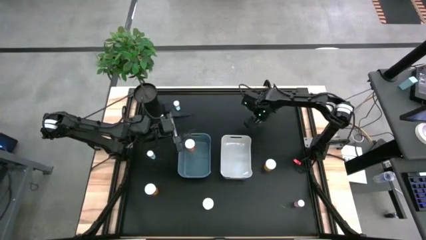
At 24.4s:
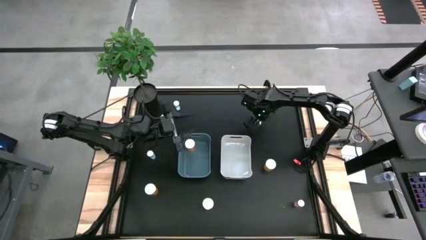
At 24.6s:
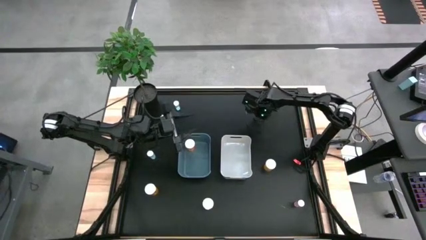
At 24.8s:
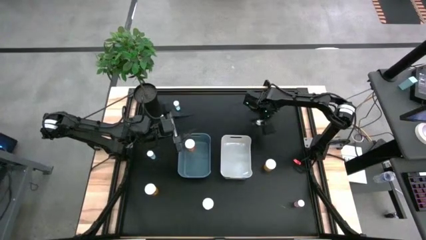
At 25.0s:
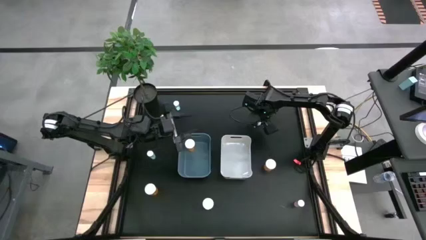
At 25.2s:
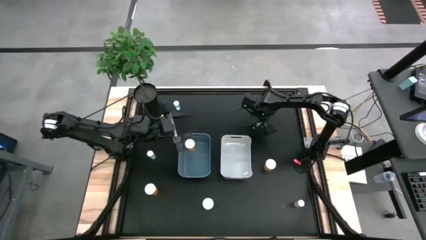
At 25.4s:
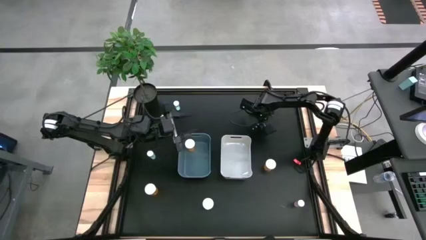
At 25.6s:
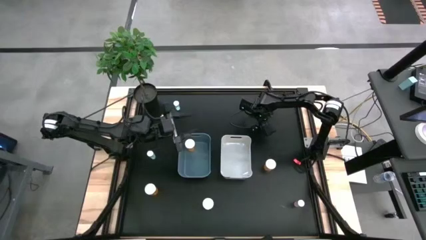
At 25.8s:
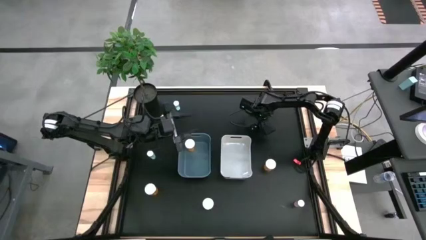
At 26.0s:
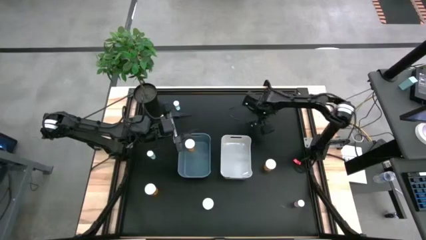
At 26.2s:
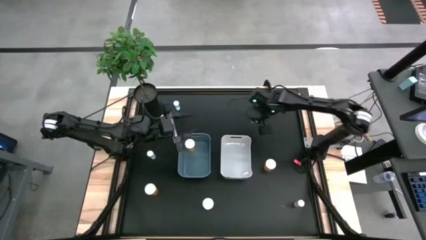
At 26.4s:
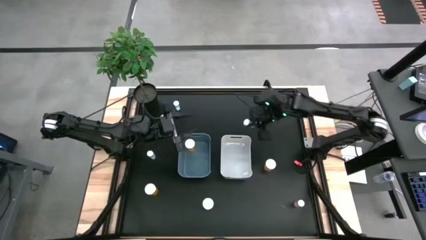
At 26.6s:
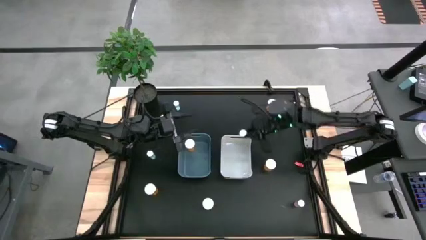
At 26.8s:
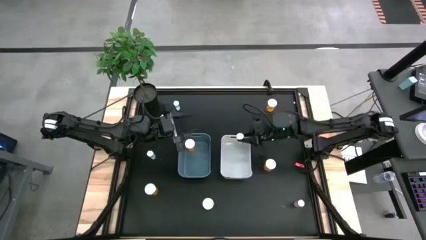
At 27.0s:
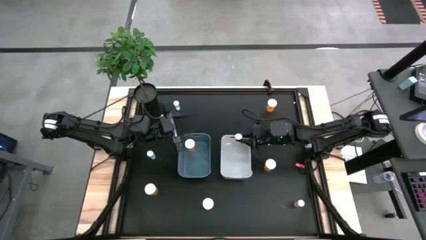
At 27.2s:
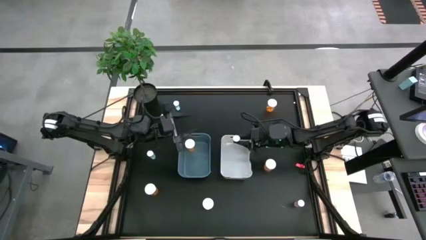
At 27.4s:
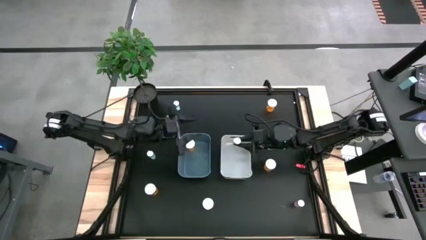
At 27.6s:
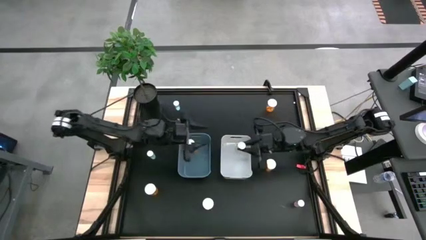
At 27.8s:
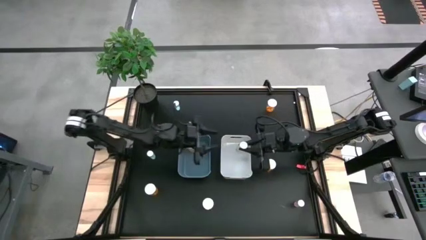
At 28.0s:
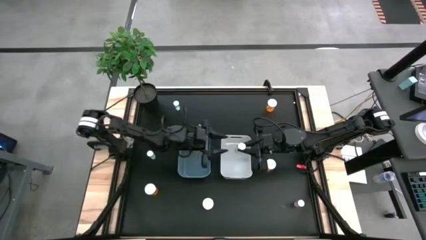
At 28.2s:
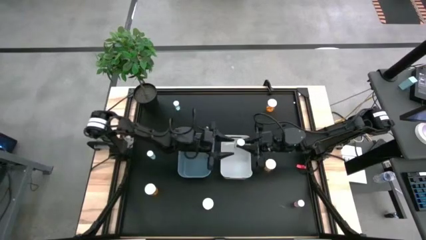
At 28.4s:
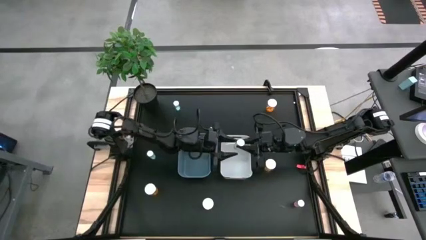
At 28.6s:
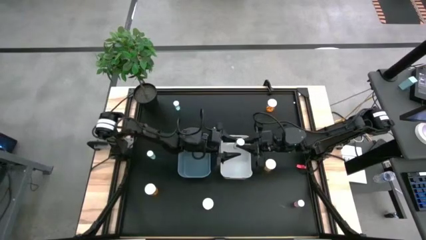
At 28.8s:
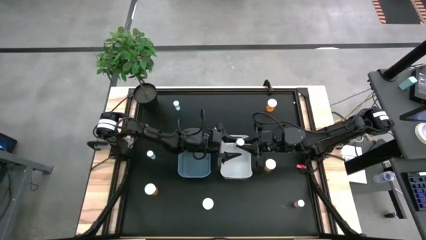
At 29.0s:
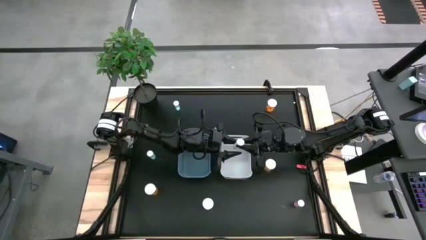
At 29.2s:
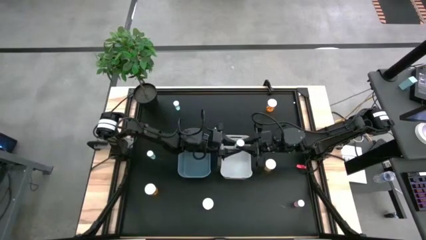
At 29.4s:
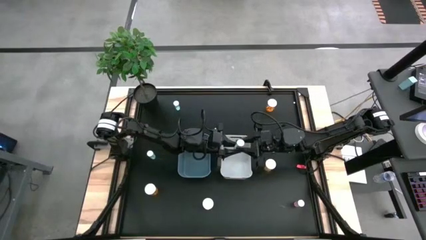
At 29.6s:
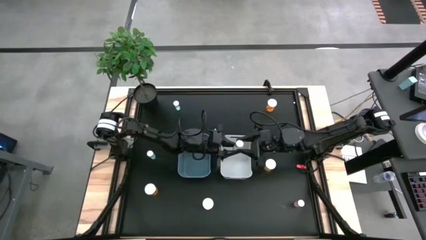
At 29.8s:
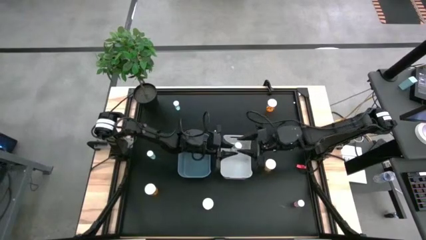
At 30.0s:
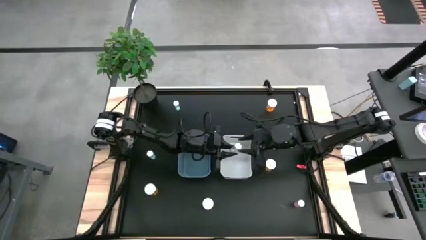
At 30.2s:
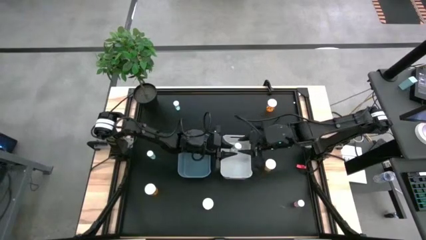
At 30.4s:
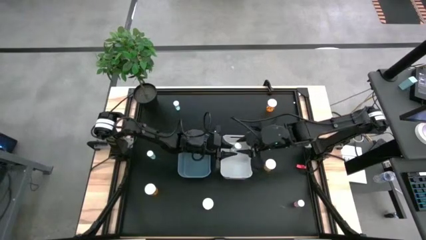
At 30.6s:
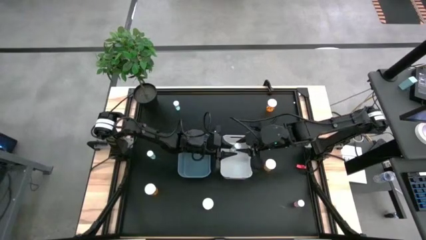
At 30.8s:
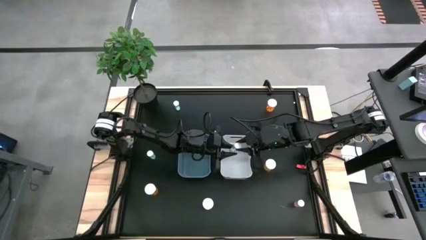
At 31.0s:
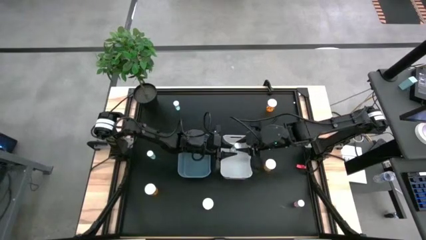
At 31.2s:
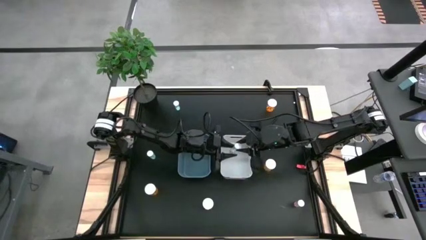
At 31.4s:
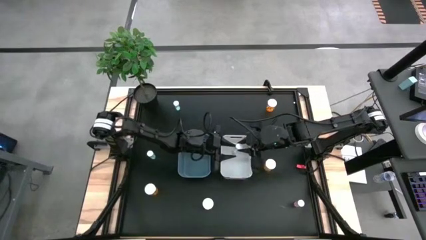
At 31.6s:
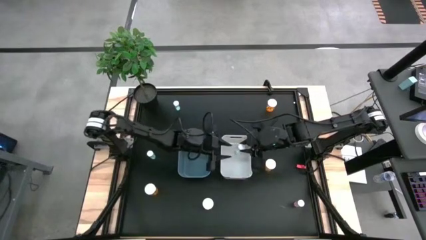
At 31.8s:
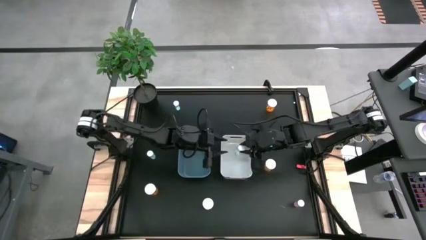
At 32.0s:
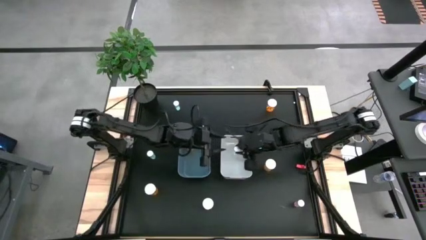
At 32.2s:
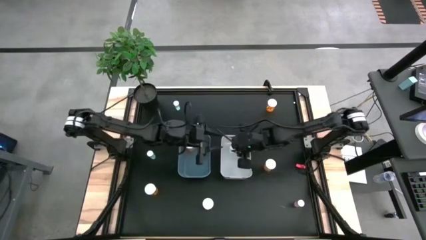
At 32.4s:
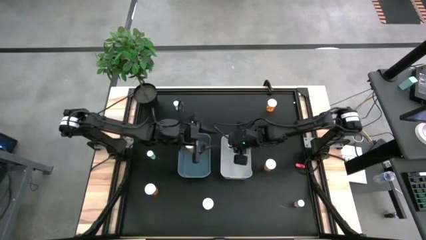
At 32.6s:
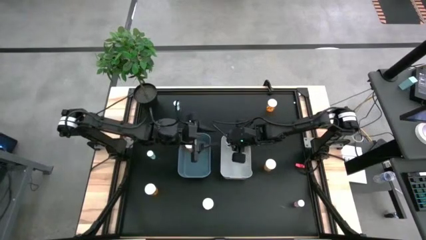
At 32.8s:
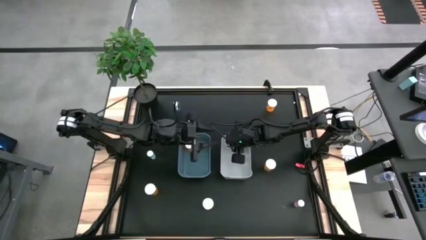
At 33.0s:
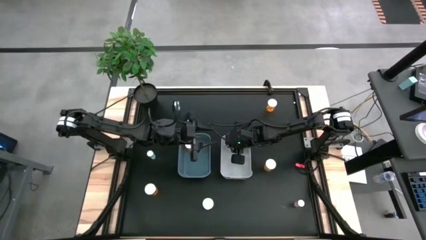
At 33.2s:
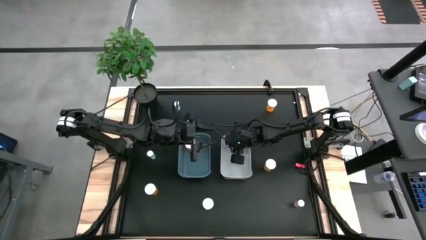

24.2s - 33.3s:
Task: Pick and place medicine bottles into bin by pill shape (circle, oval)
Put the blue tablet bottle into the white bin

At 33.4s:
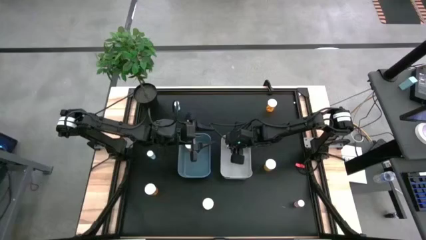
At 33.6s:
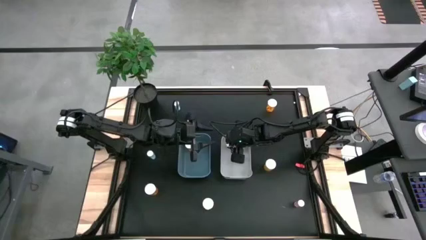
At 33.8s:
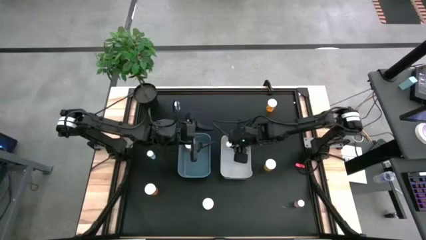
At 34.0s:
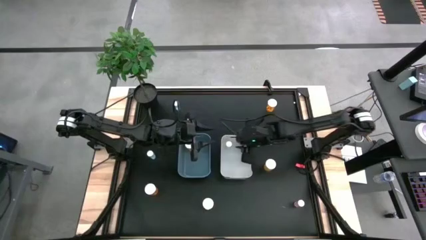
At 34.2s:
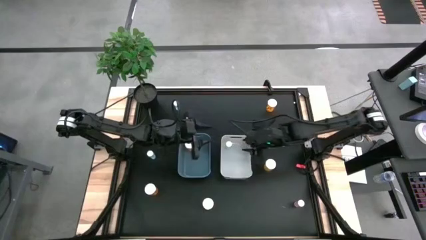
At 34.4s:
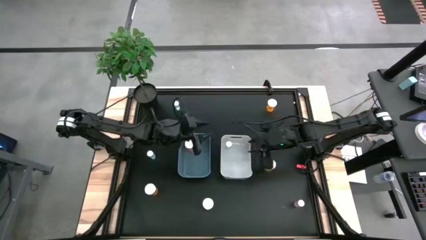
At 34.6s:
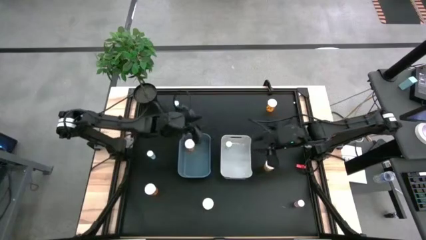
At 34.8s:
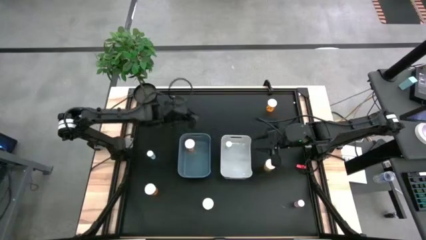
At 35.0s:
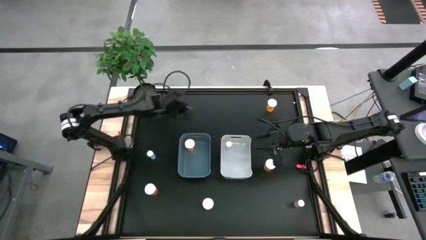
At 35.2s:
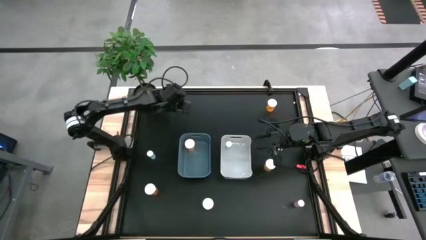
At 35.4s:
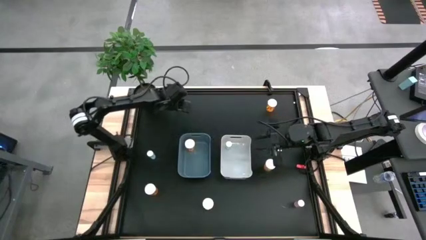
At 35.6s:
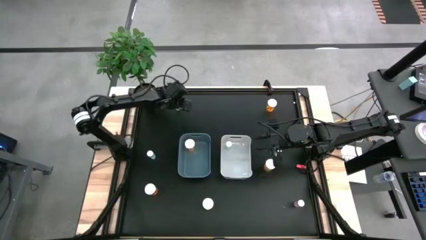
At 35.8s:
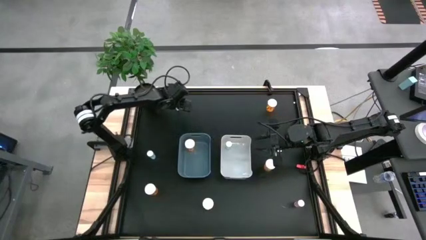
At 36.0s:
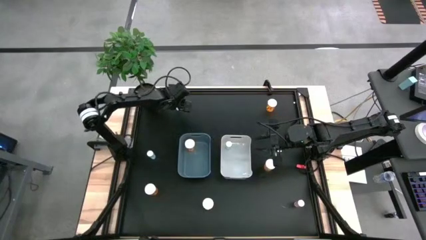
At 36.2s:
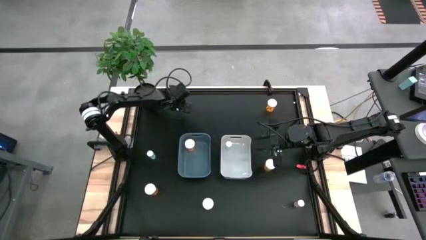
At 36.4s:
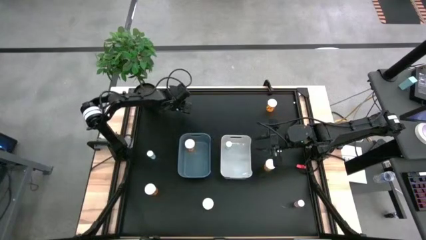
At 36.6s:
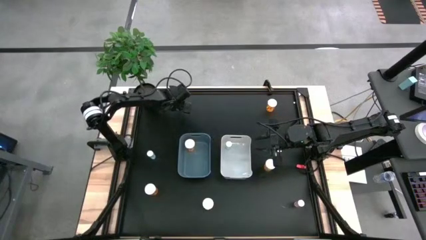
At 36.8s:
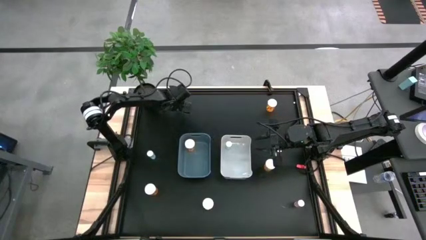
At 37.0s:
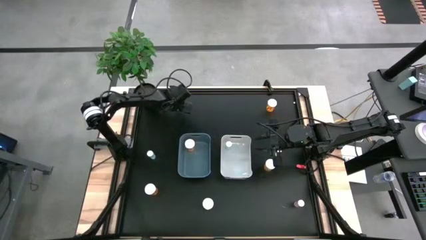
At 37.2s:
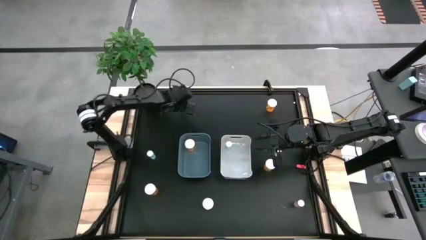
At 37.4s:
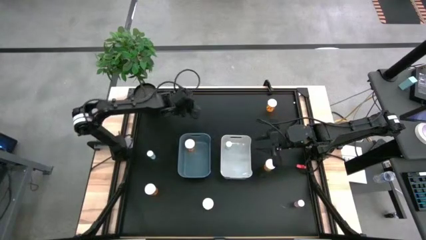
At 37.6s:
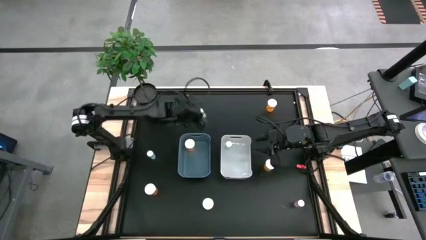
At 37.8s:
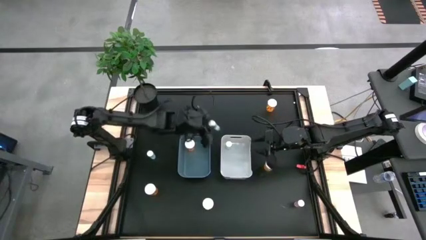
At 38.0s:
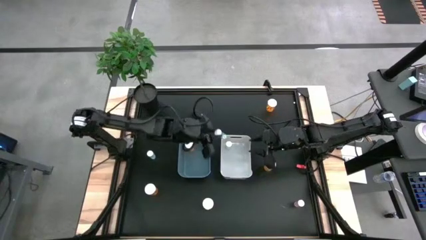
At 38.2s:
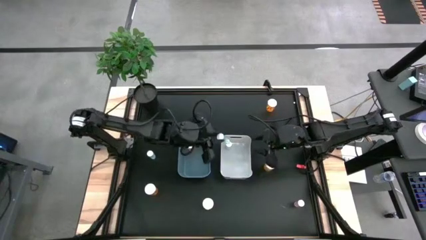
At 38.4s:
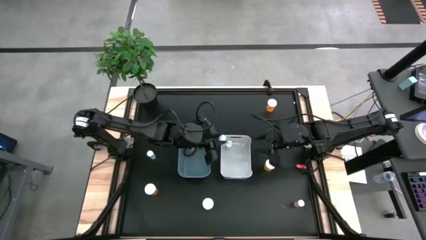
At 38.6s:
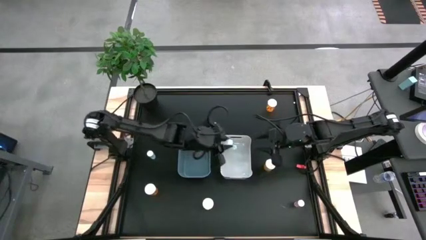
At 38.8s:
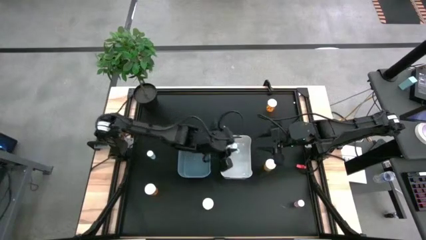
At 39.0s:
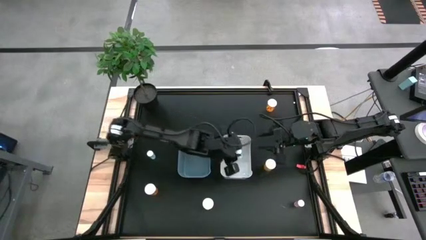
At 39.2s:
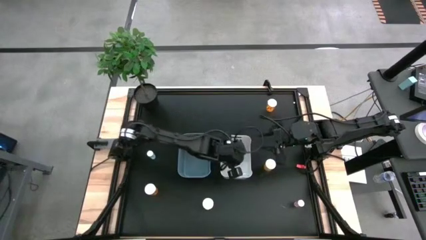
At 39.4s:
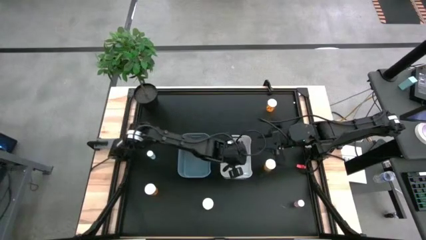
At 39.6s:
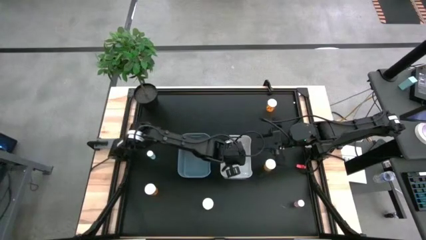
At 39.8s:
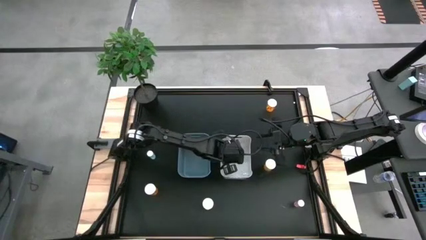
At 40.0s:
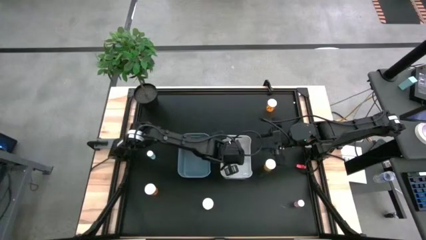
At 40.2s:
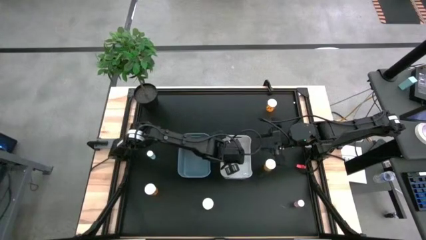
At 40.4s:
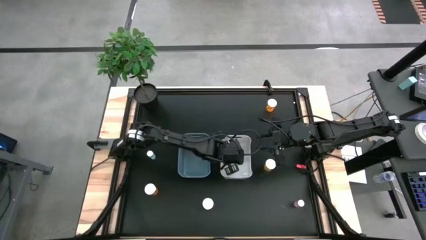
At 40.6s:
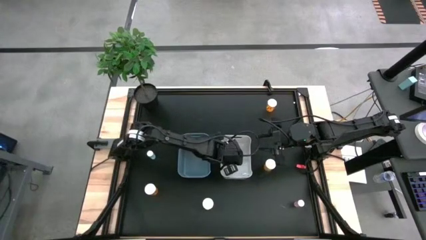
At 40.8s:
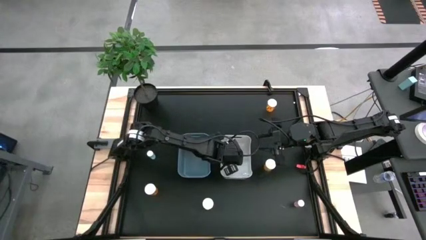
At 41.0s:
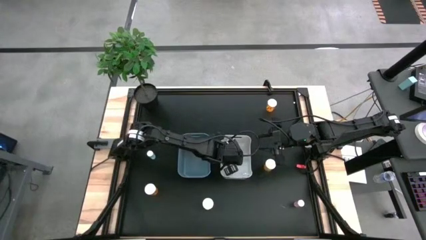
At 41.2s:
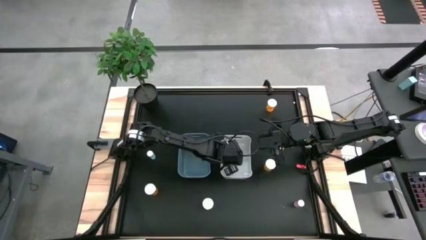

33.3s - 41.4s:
Put the blue tablet bottle into the white bin
